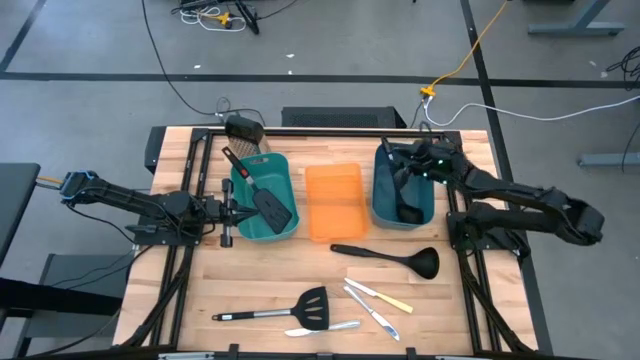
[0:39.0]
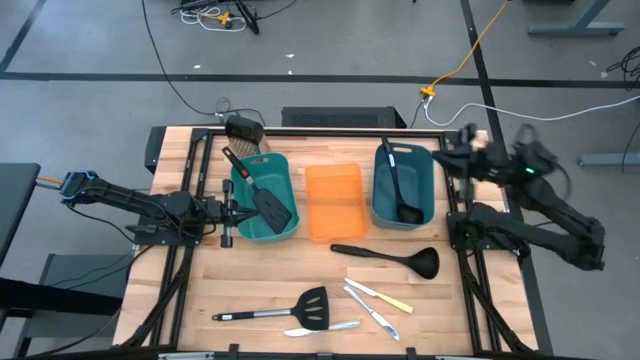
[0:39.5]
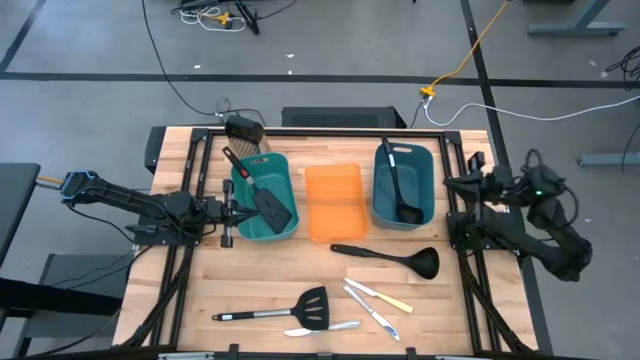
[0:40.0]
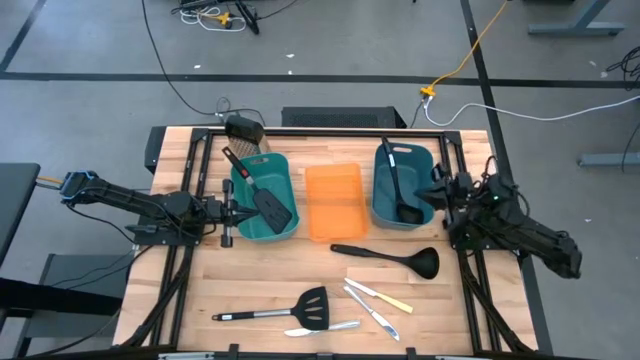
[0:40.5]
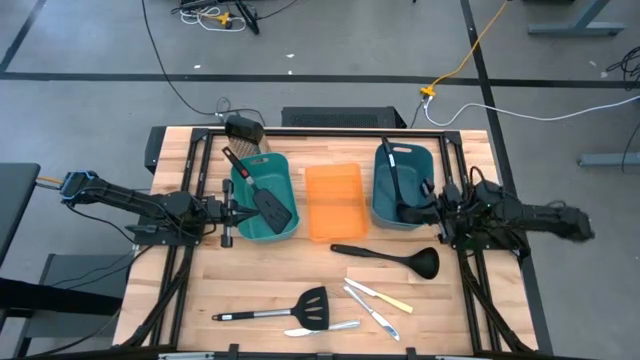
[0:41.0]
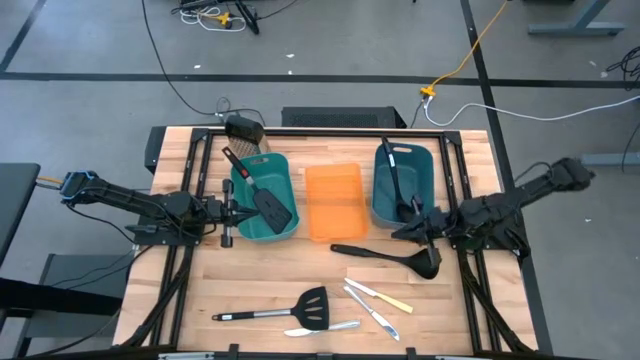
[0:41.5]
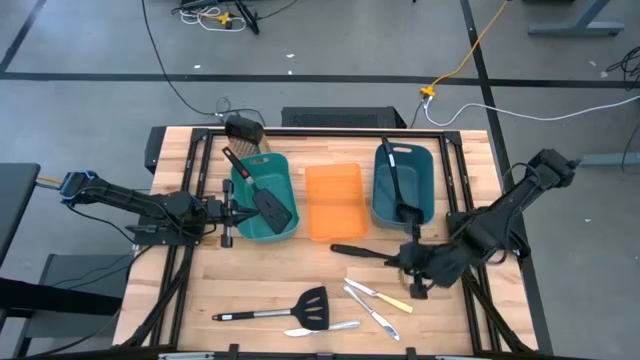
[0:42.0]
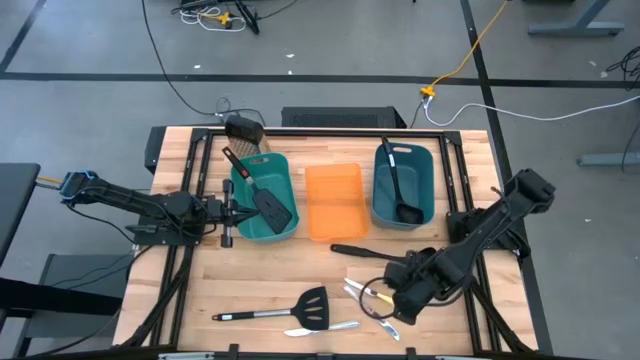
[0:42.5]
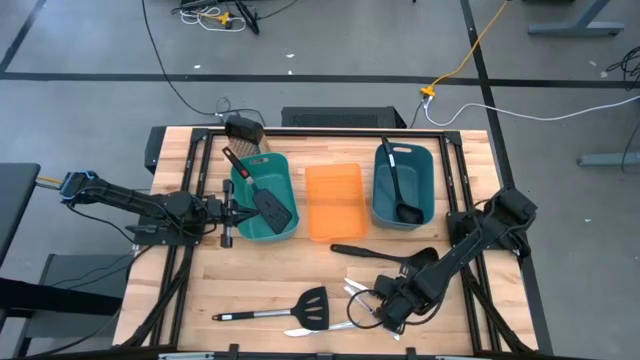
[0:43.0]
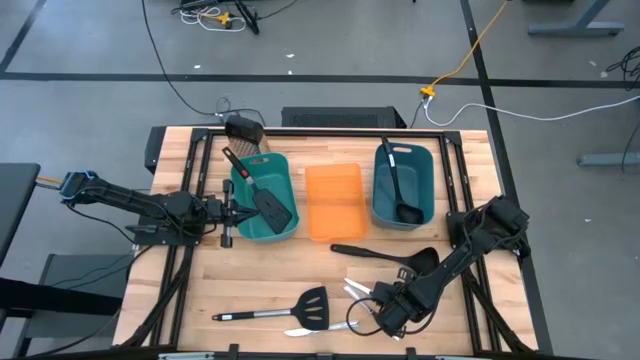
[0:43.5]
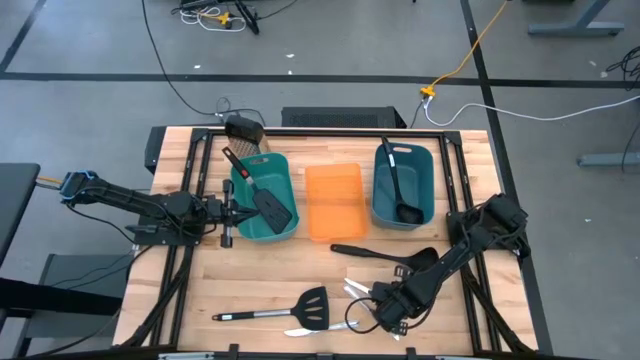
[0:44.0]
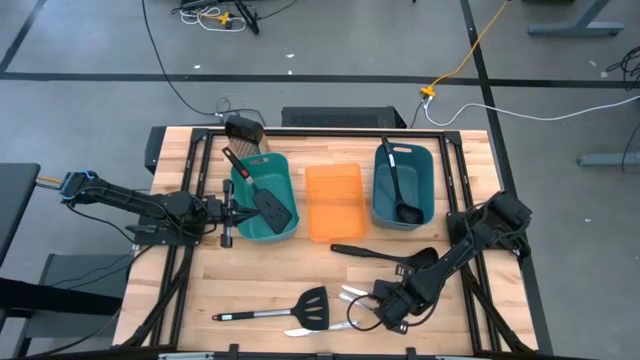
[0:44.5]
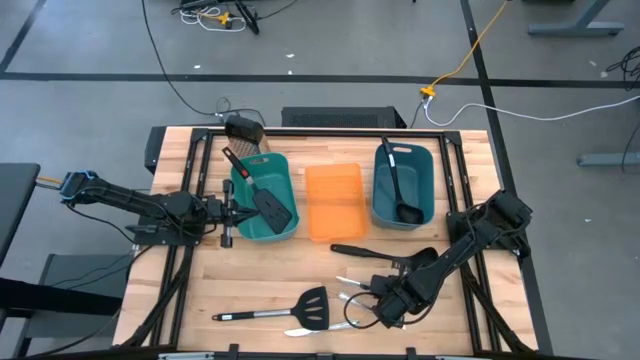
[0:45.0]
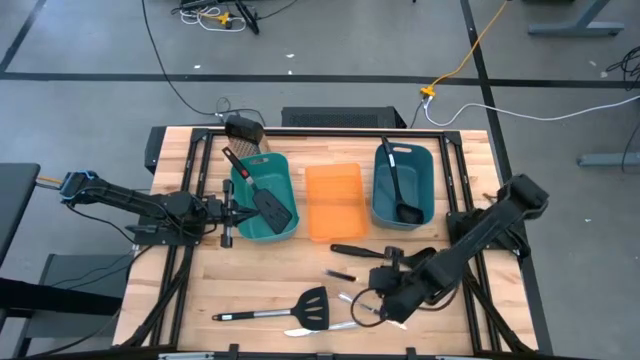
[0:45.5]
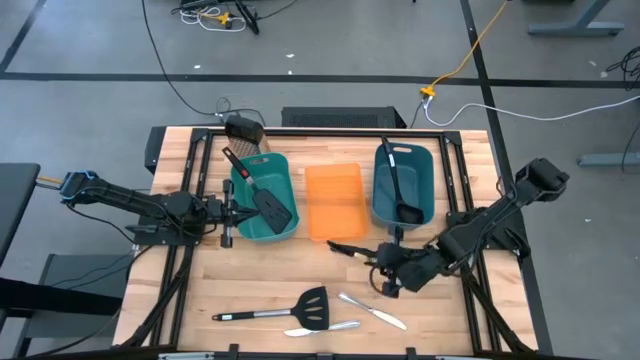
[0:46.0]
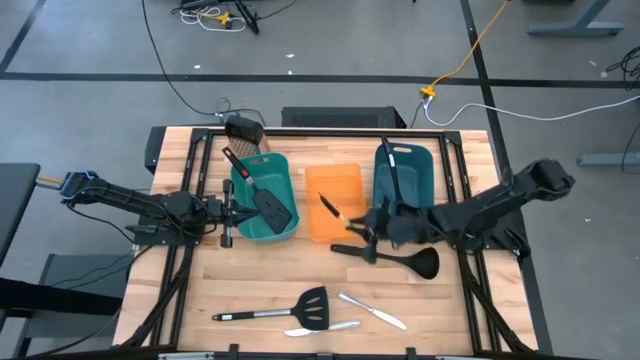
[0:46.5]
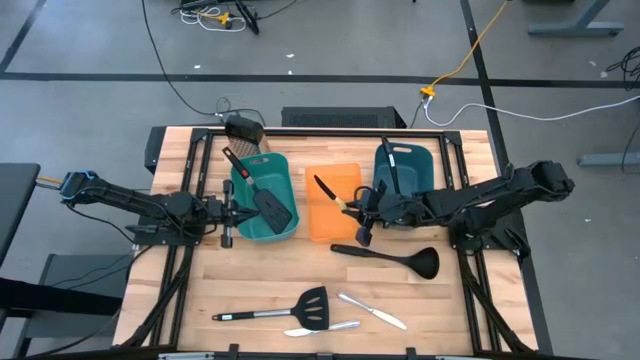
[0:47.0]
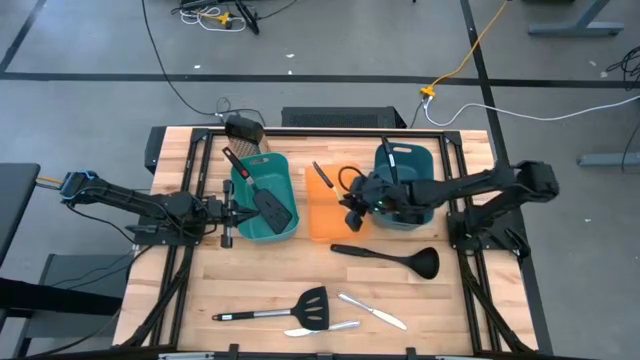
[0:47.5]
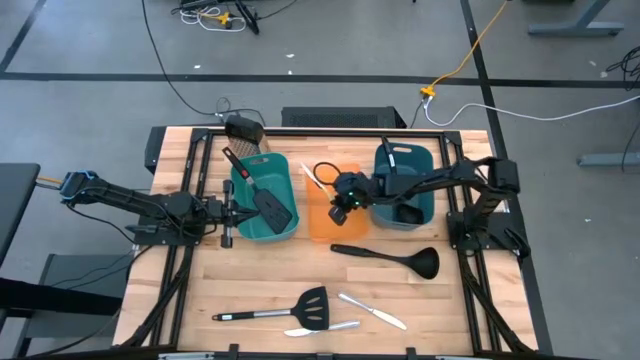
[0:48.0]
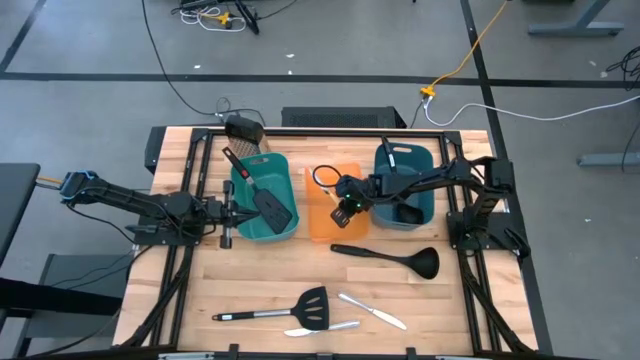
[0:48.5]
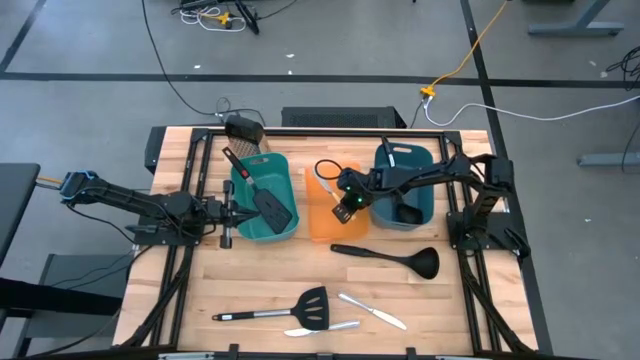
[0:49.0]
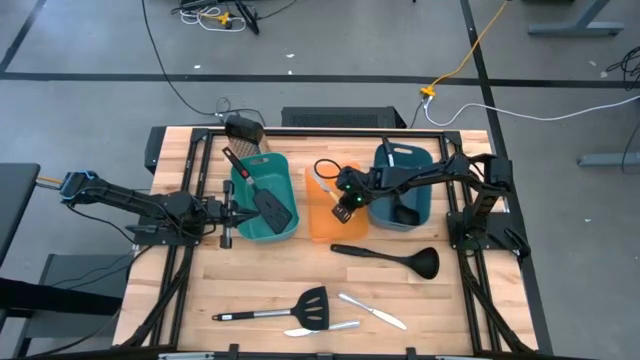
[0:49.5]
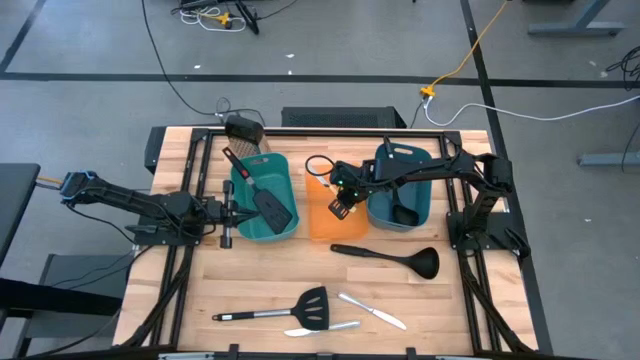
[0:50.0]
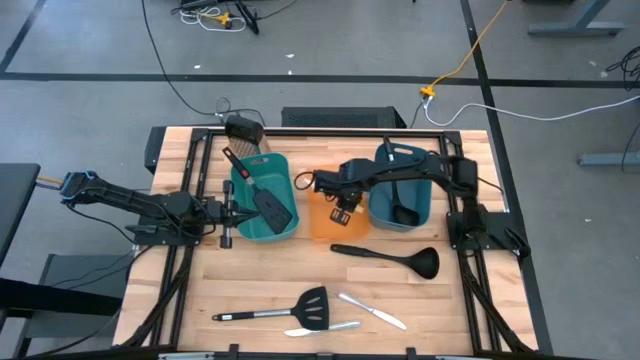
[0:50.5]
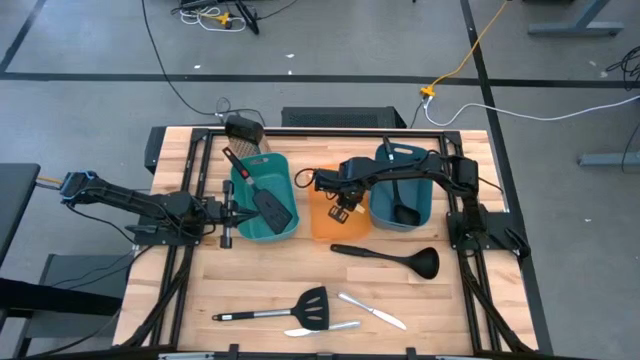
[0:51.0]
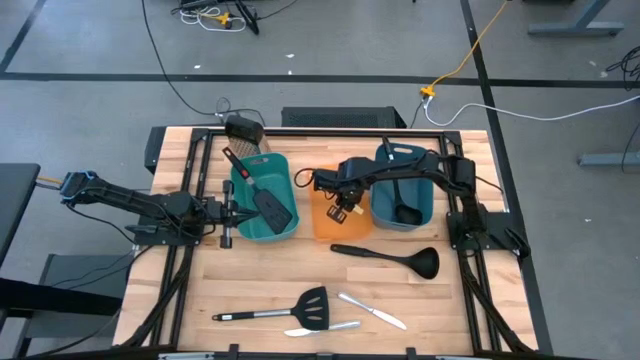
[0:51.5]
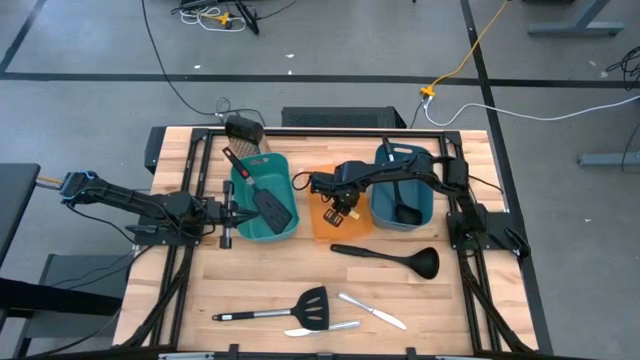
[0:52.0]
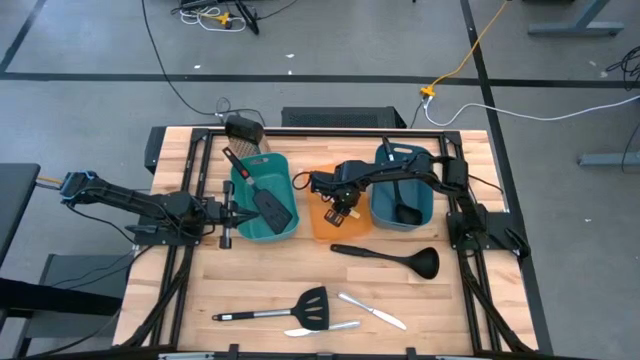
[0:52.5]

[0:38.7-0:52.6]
Task: Pick & Place Kitchen Items
Put the yellow table knife into the orange bin

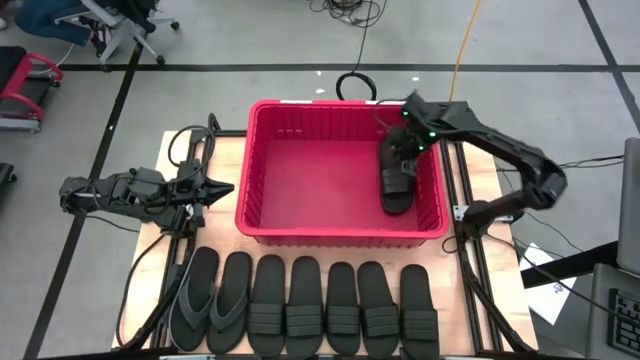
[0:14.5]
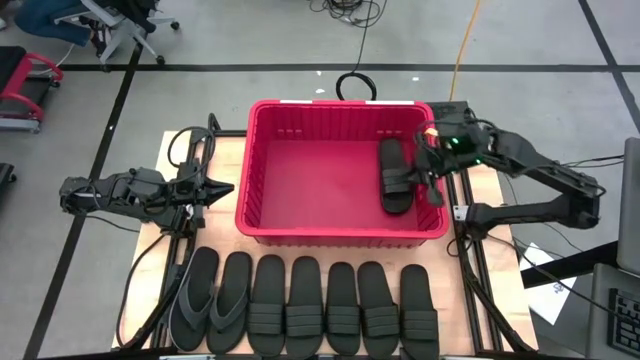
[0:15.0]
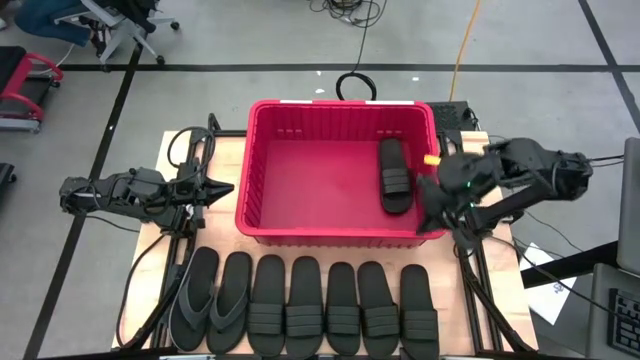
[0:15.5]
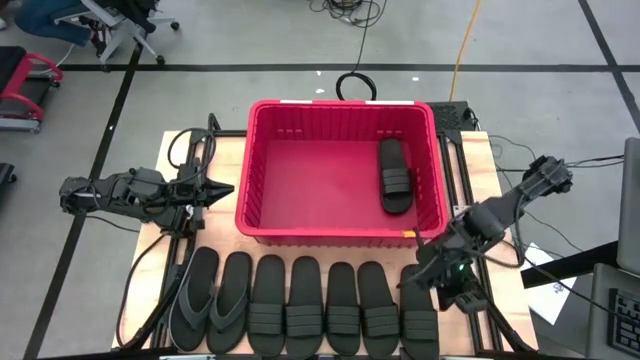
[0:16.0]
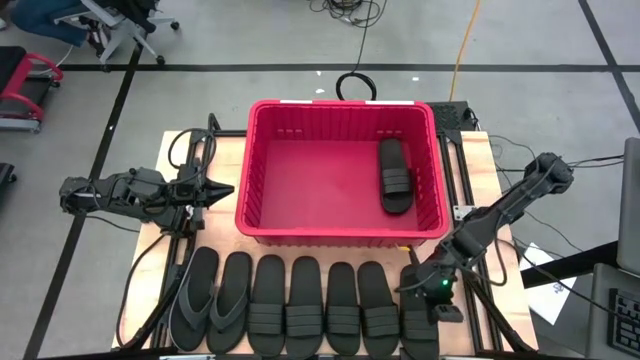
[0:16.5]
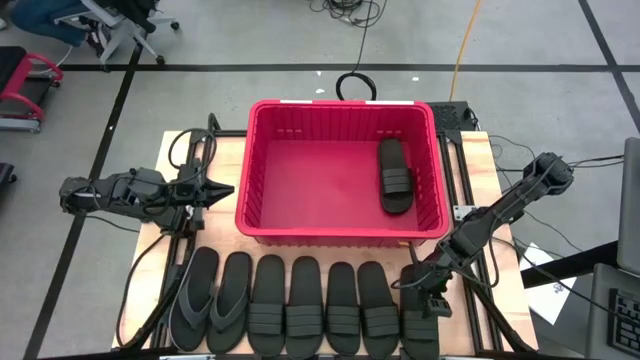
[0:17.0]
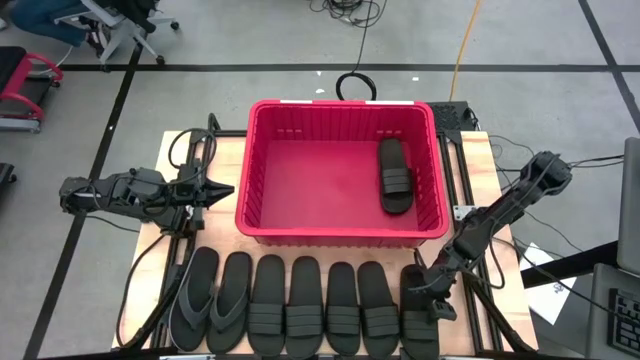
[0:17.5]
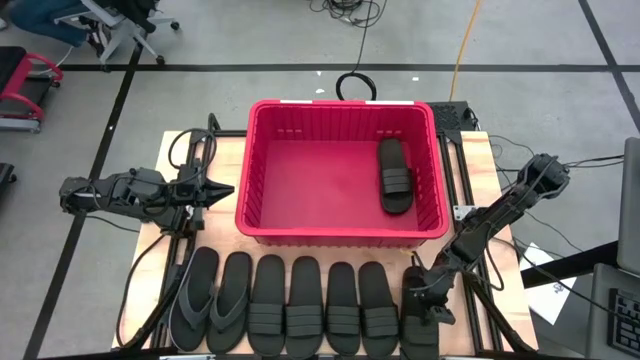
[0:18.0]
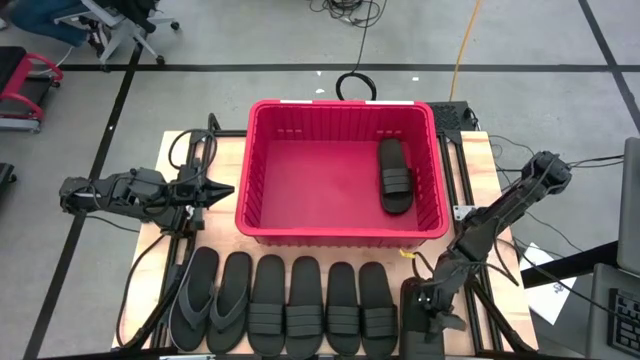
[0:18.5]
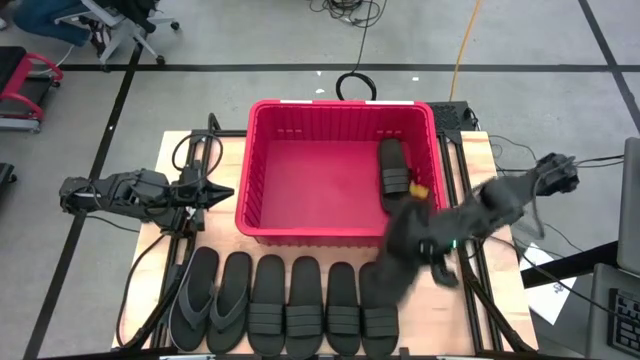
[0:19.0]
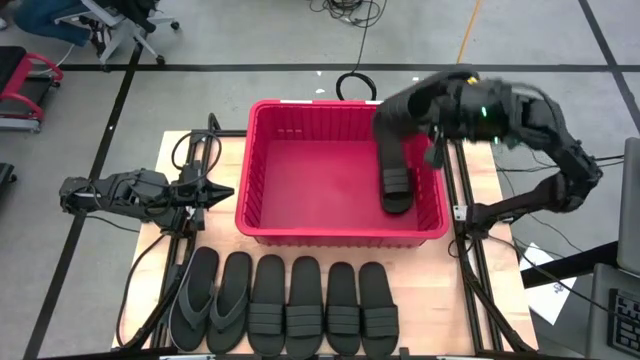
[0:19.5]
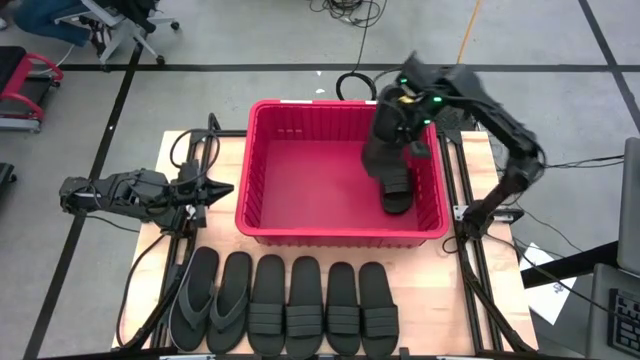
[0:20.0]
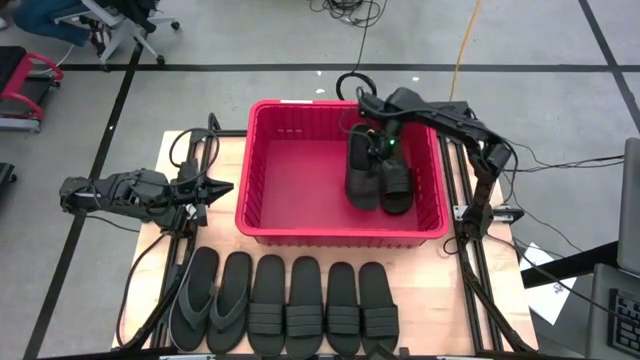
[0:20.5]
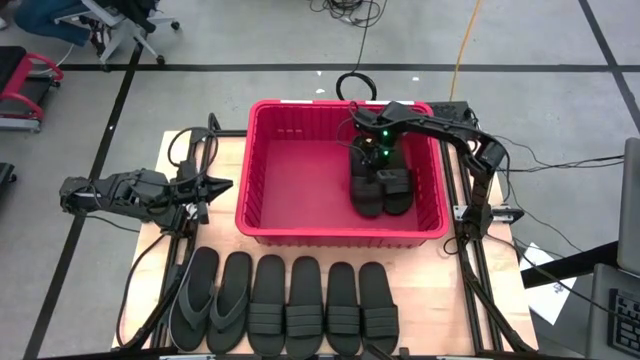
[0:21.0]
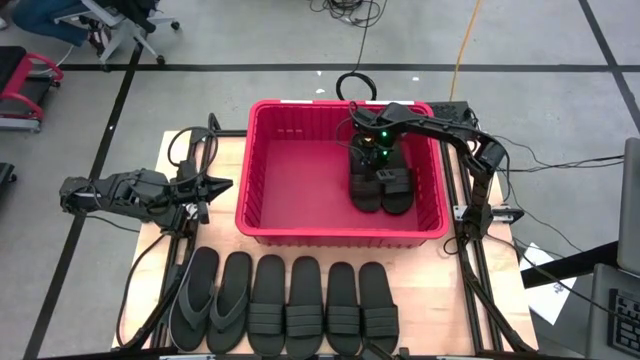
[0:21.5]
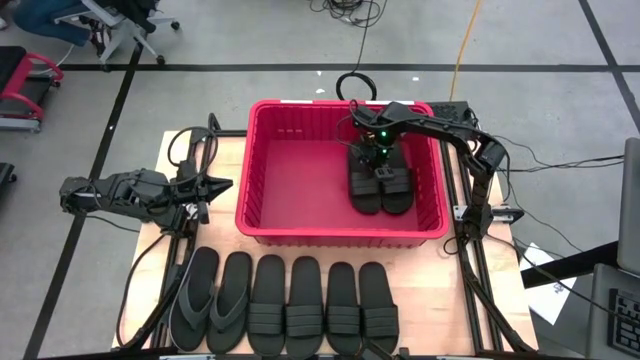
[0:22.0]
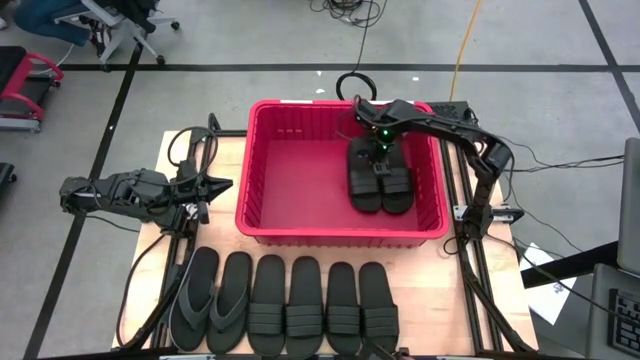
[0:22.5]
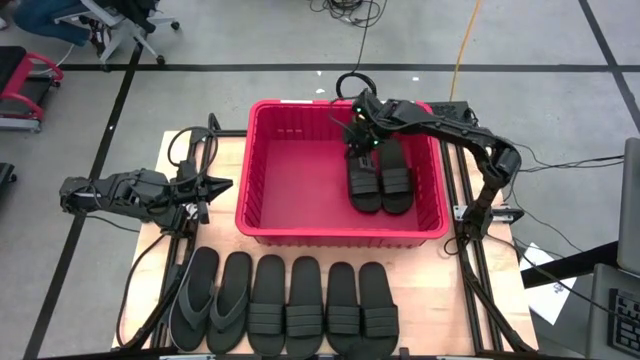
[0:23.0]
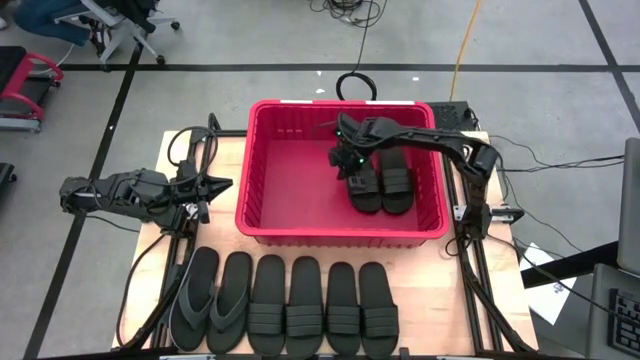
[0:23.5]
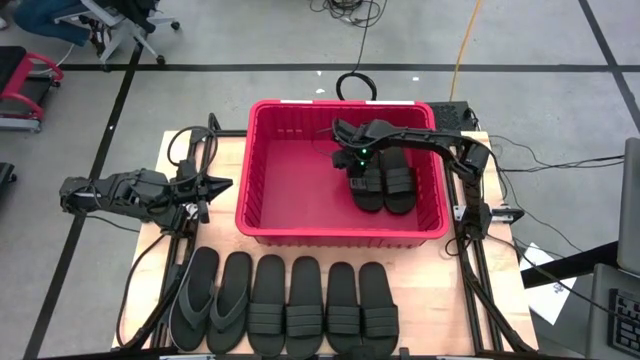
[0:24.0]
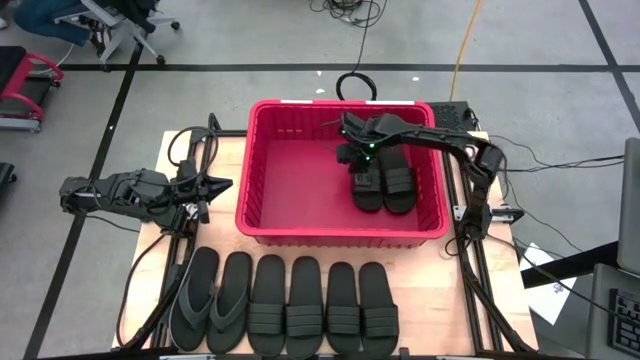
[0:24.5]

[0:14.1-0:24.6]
Task: Pick and place slides into bin
Put the black slipper into the red bin
